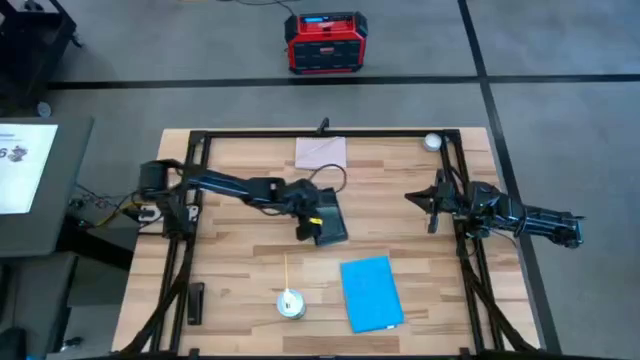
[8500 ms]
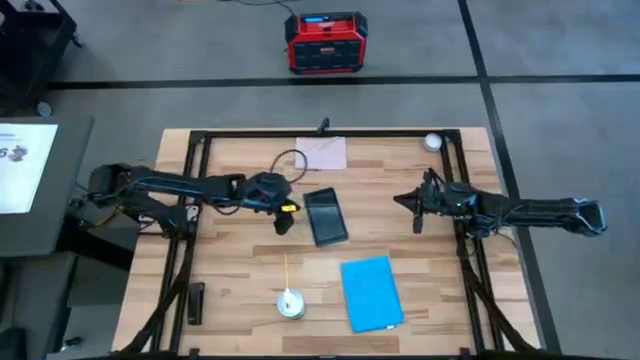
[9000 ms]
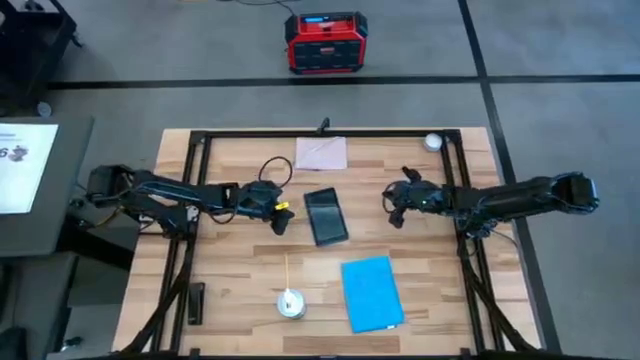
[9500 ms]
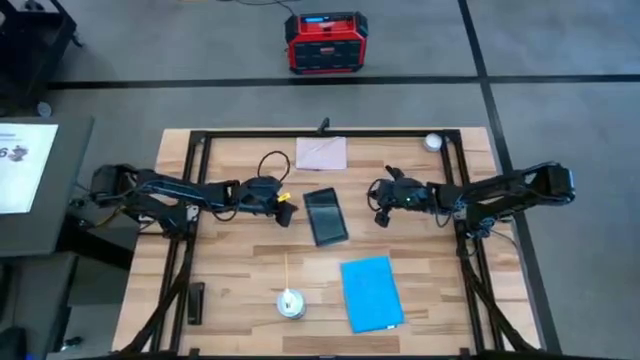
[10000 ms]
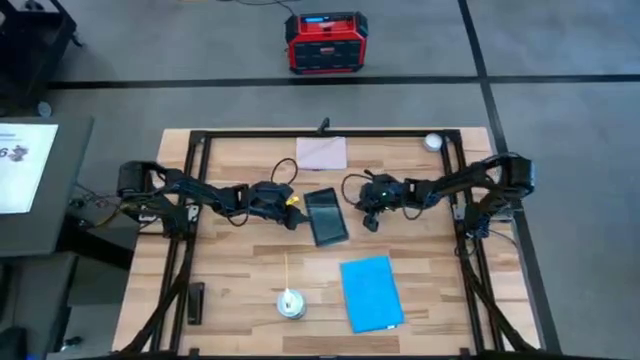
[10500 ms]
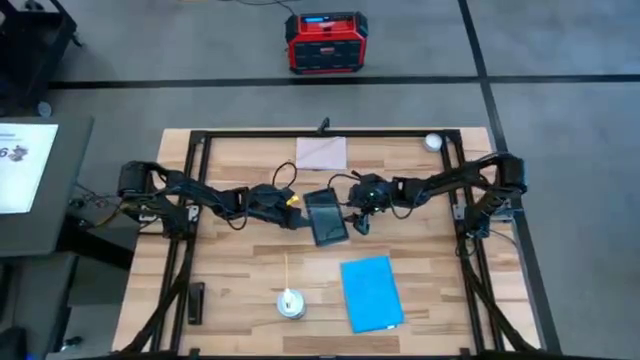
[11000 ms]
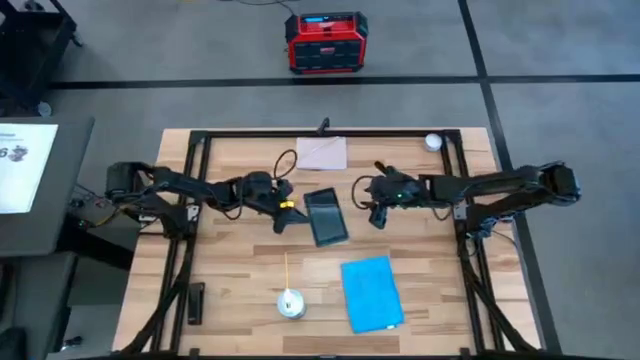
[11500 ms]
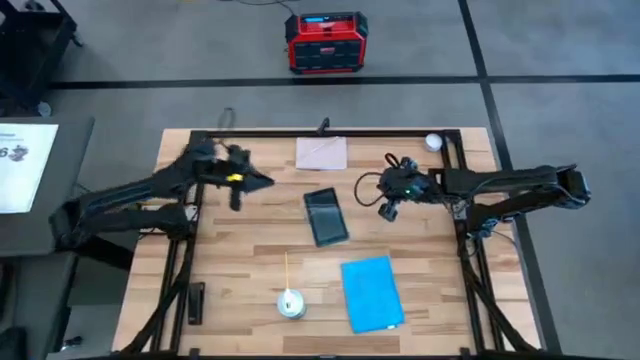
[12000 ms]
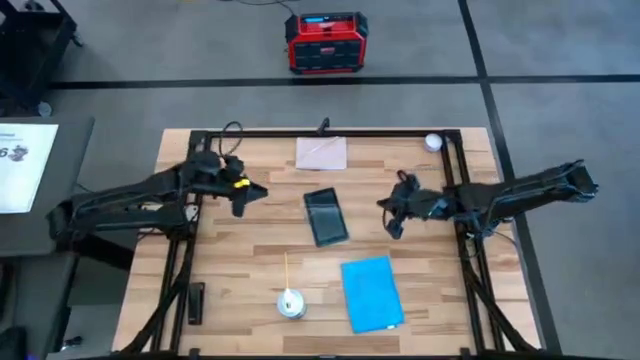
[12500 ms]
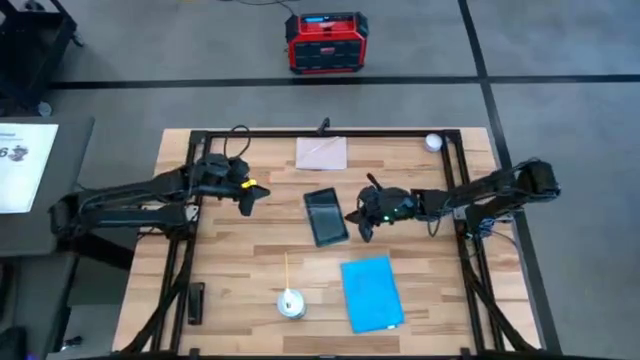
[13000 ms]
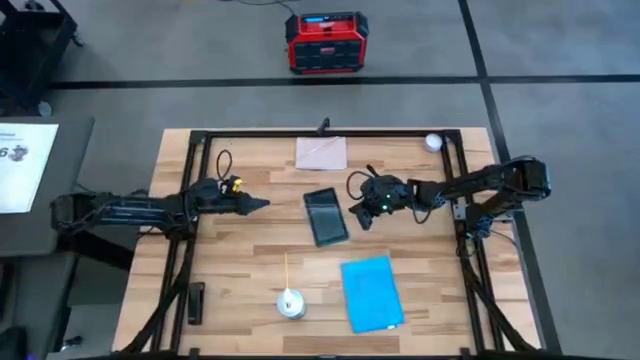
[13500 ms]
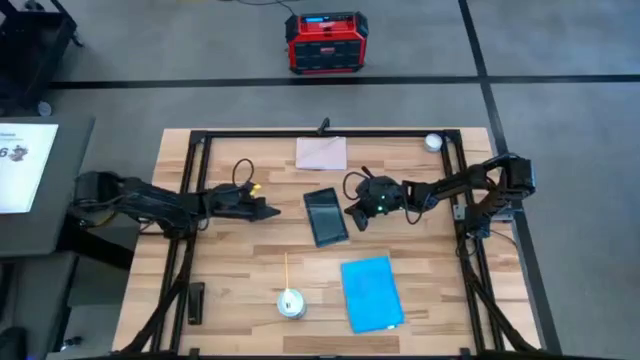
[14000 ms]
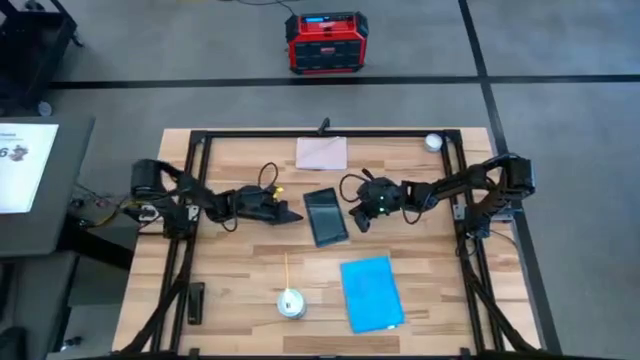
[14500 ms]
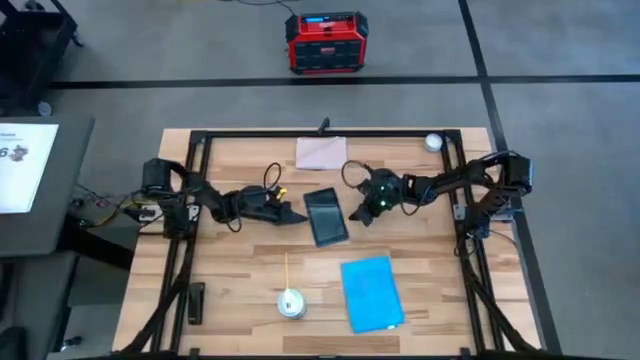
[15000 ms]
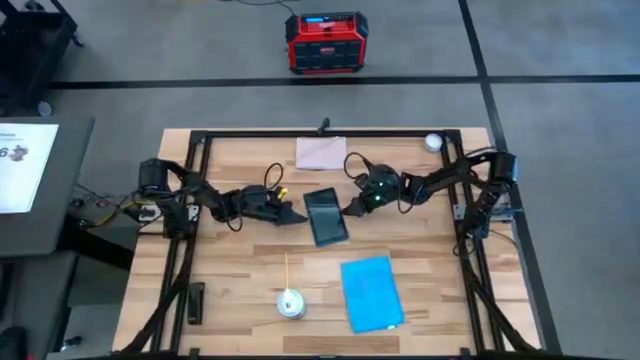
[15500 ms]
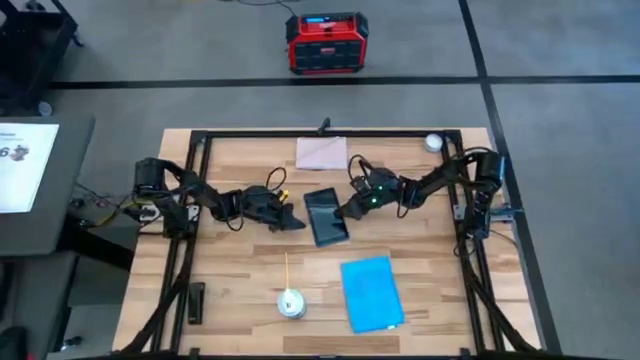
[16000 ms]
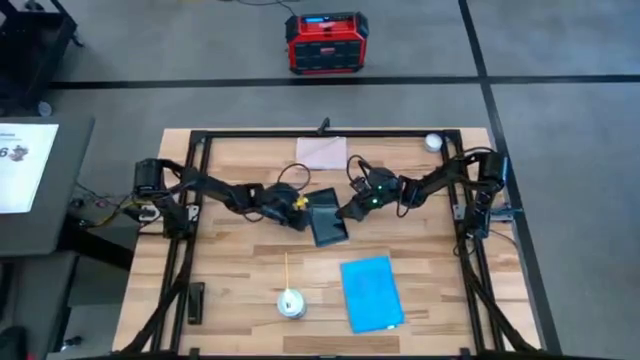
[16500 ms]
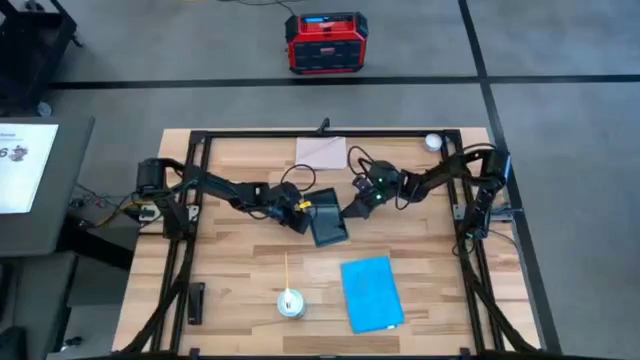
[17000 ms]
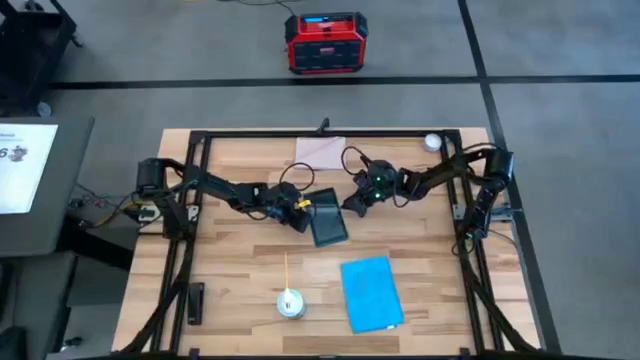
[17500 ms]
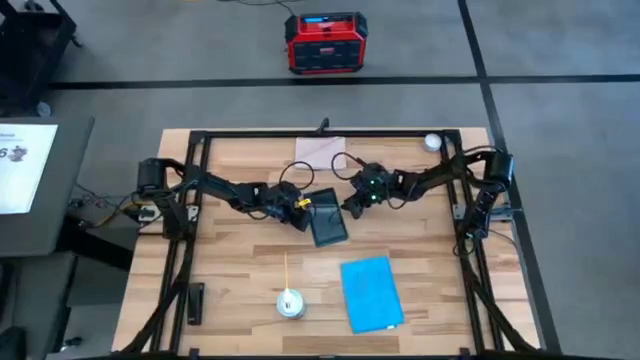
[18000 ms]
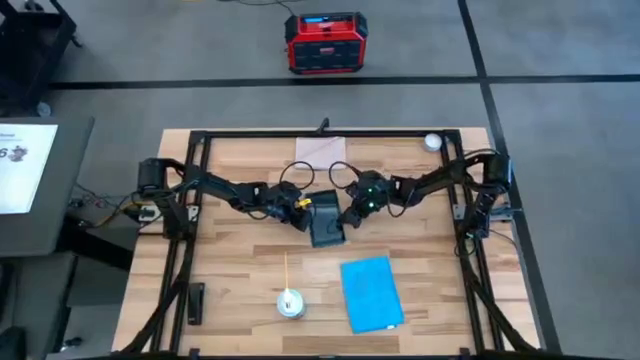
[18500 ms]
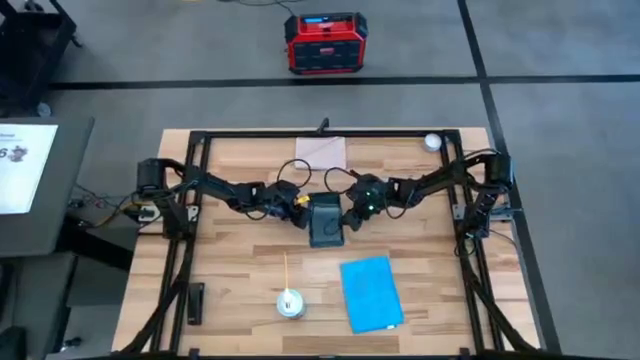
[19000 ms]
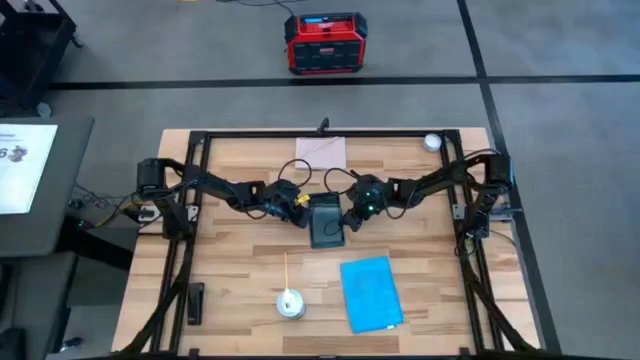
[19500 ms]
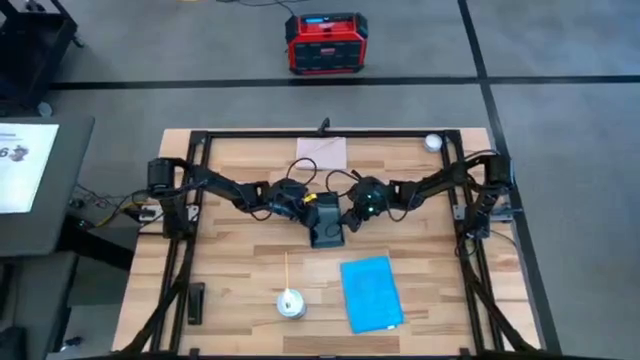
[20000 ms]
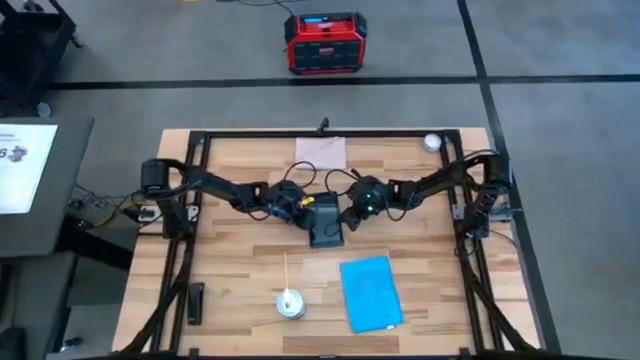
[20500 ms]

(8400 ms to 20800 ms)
Task: Apply microfiber cloth
Spray the front of the tablet using the spray bottle

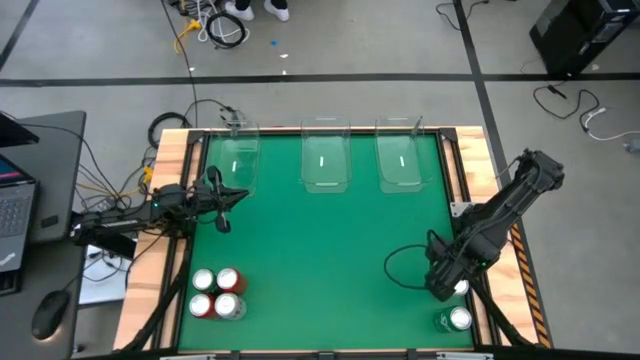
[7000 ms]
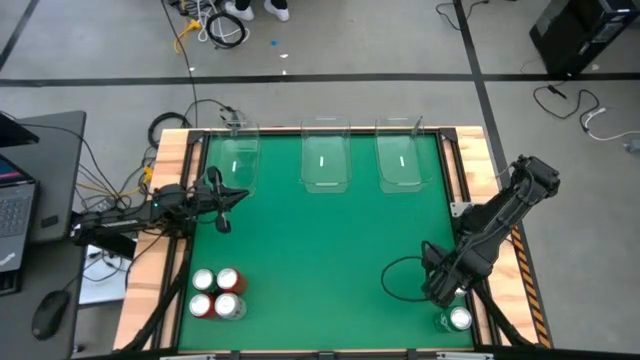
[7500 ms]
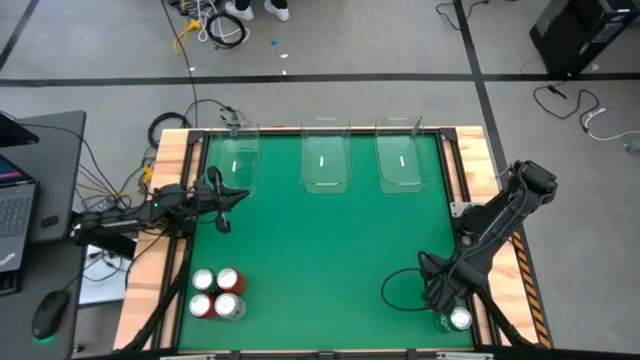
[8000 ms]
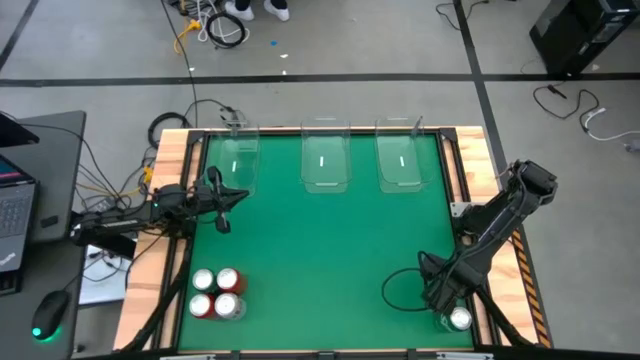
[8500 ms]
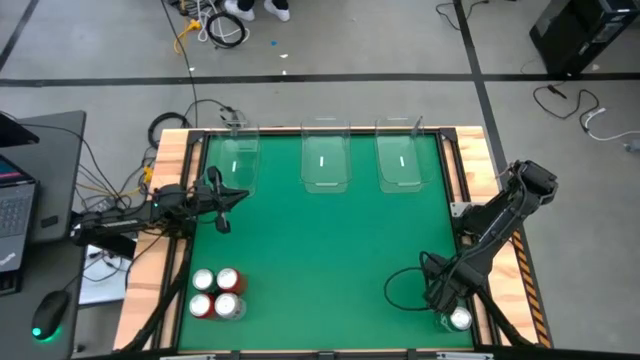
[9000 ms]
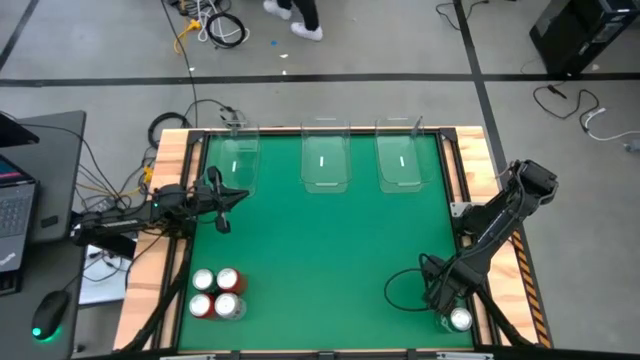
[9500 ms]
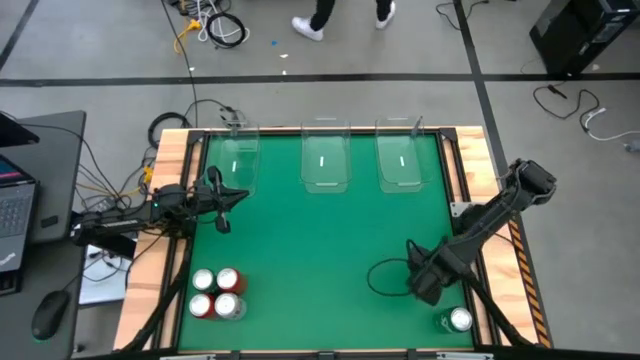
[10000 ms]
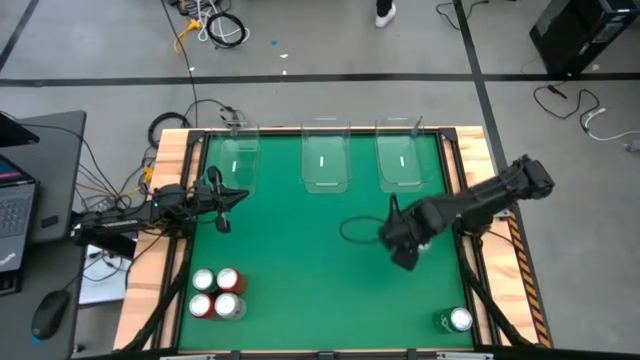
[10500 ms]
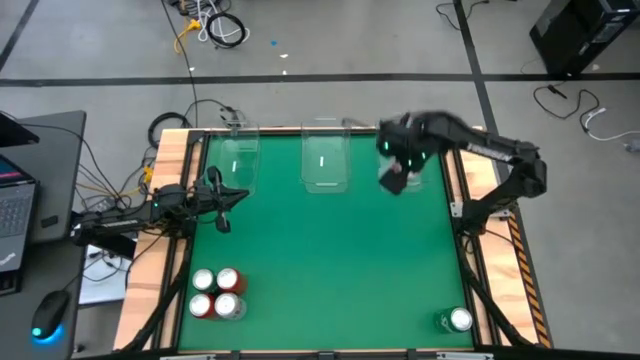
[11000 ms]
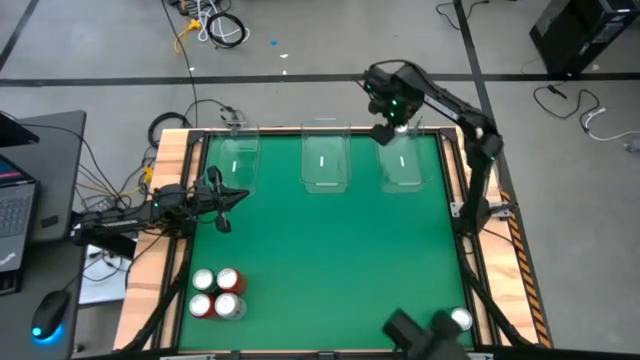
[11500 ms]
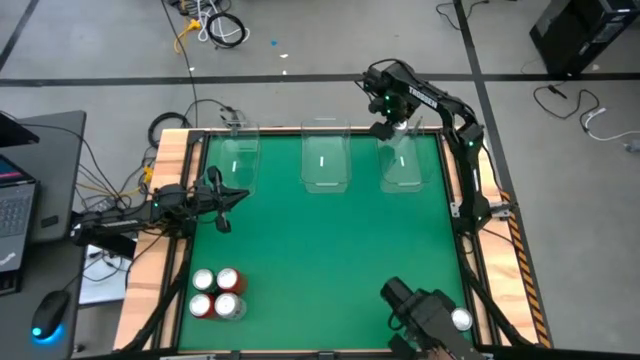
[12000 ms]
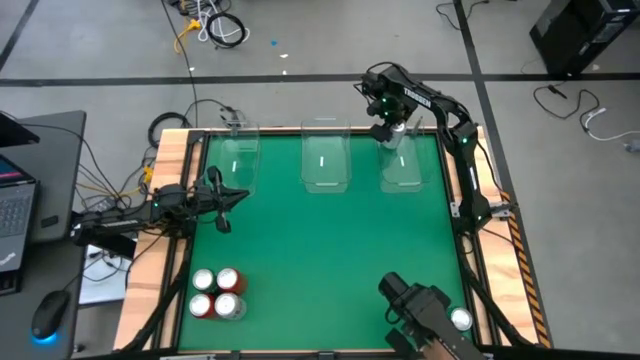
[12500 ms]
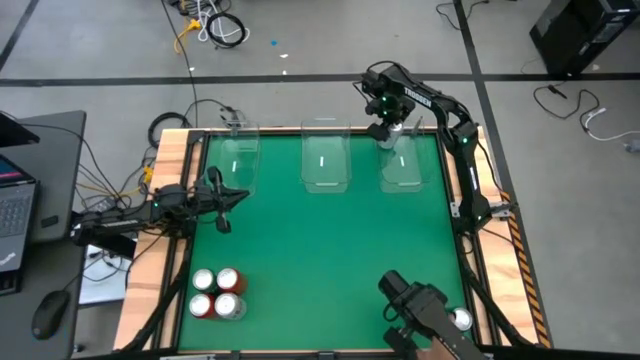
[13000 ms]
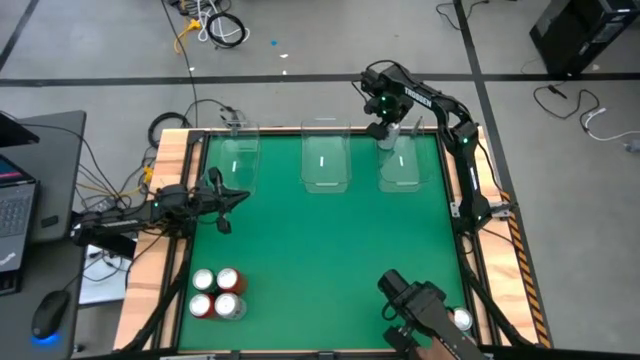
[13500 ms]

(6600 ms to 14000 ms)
Task: Sort soda cans
Put the right white soda can into the right transparent bin

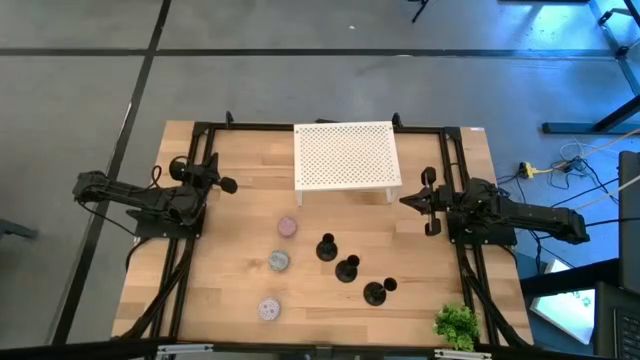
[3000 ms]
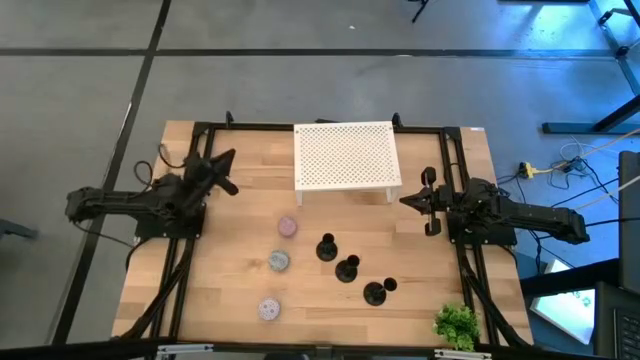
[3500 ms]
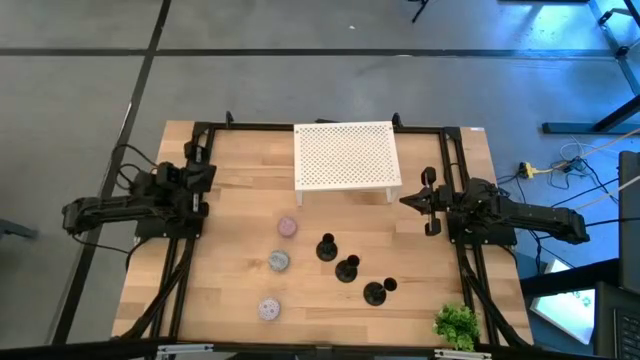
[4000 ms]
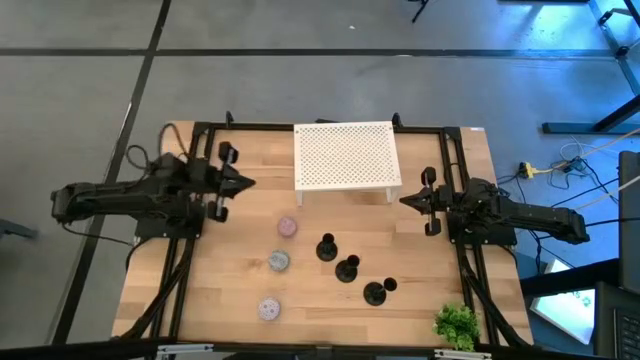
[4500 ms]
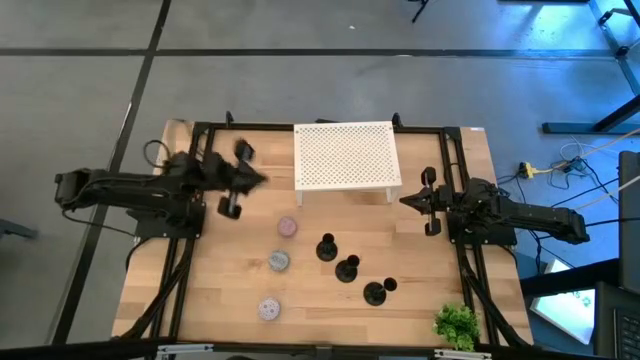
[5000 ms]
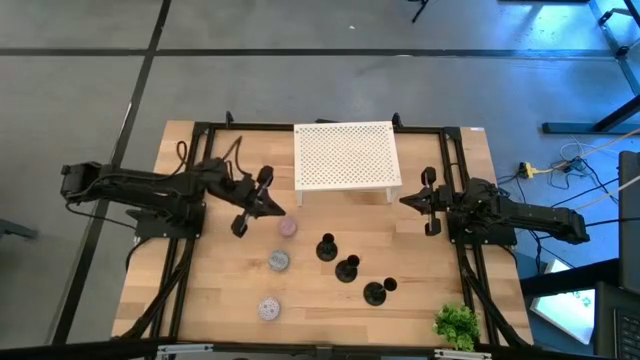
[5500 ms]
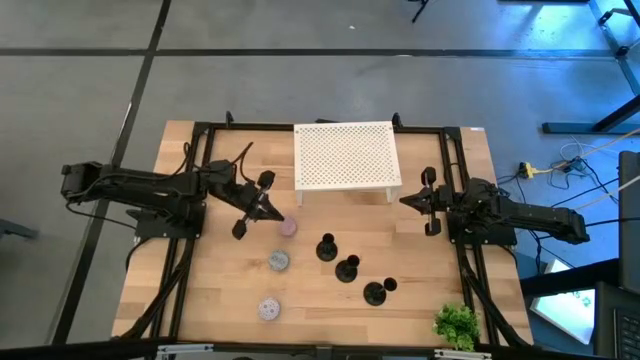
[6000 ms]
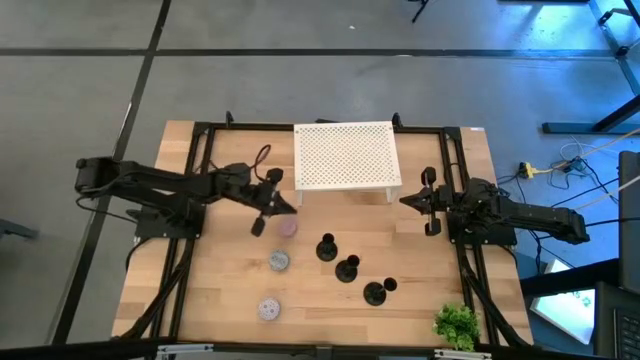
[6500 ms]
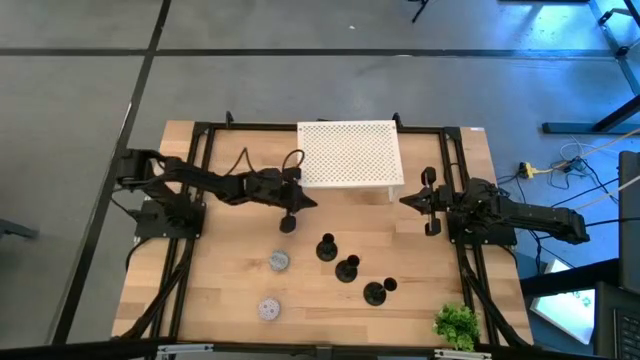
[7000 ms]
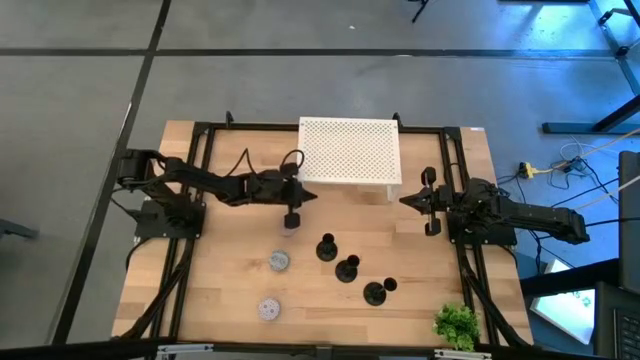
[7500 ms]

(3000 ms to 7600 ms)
Task: Pick & Place candle stick holders
Adjust the shelf
